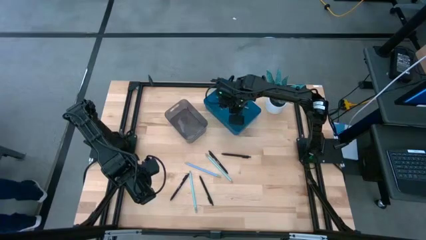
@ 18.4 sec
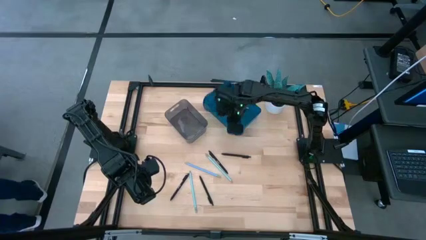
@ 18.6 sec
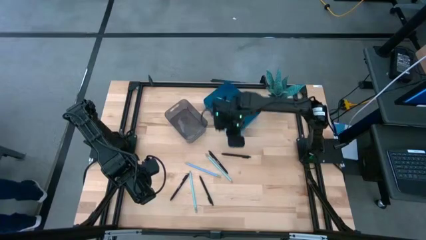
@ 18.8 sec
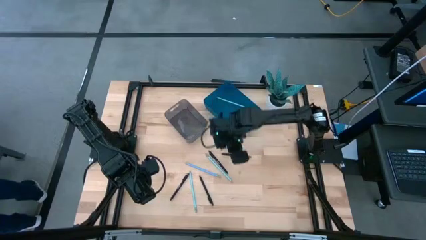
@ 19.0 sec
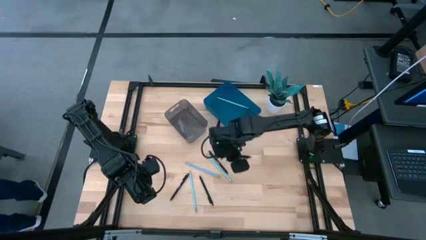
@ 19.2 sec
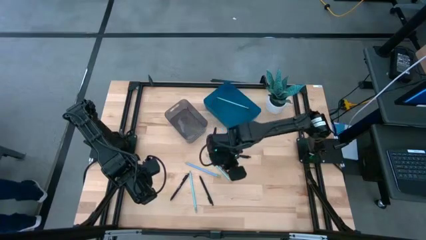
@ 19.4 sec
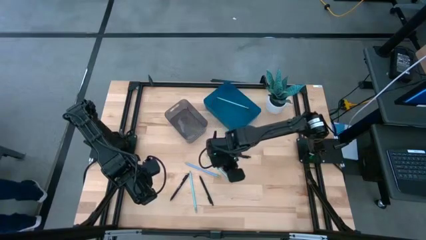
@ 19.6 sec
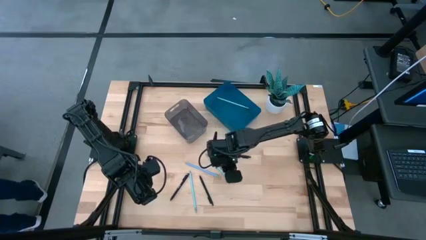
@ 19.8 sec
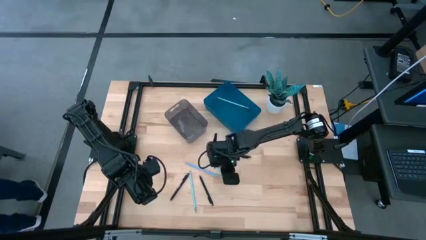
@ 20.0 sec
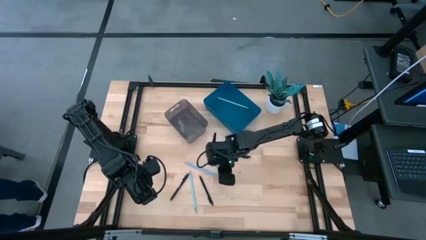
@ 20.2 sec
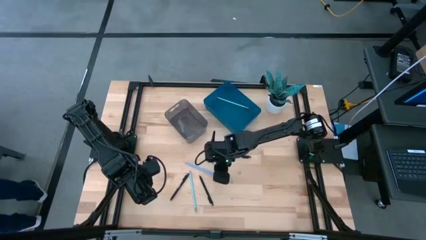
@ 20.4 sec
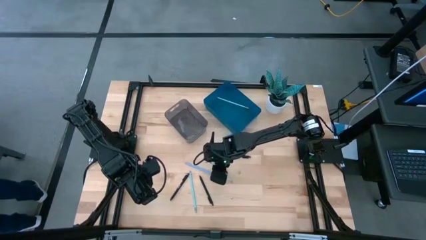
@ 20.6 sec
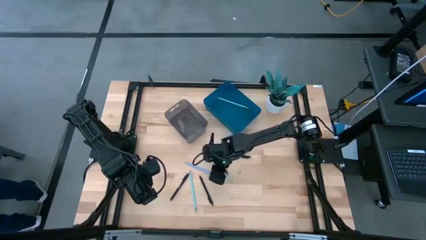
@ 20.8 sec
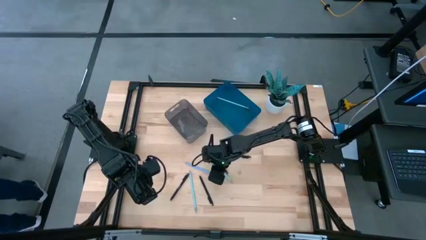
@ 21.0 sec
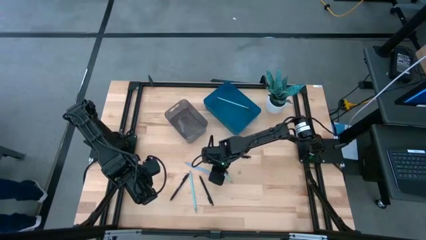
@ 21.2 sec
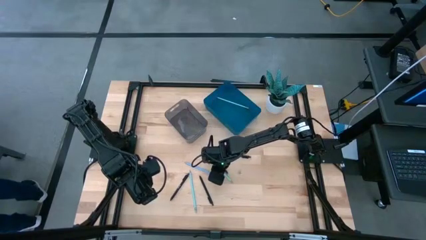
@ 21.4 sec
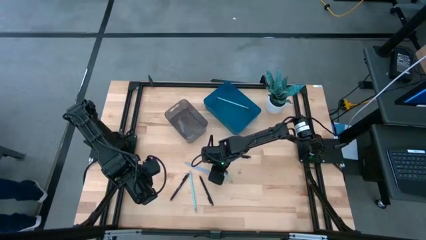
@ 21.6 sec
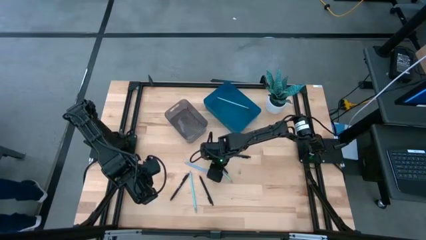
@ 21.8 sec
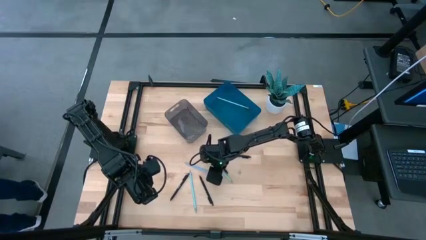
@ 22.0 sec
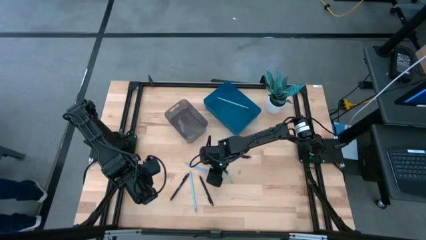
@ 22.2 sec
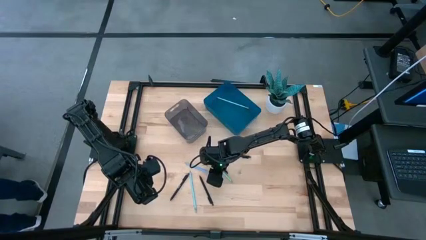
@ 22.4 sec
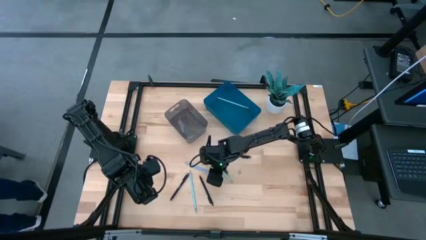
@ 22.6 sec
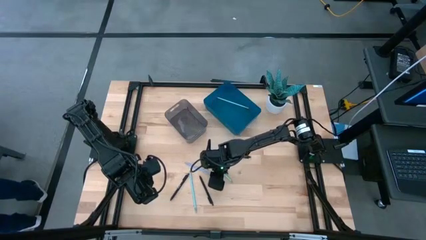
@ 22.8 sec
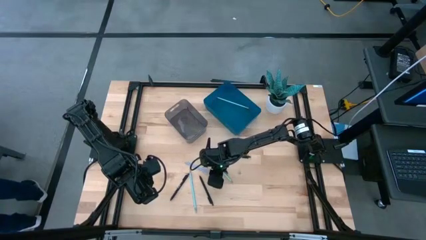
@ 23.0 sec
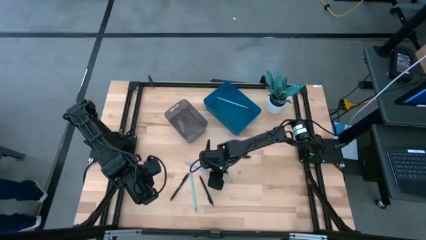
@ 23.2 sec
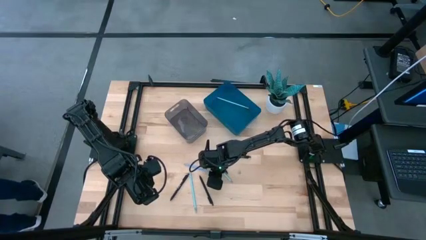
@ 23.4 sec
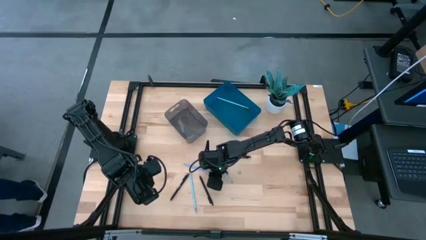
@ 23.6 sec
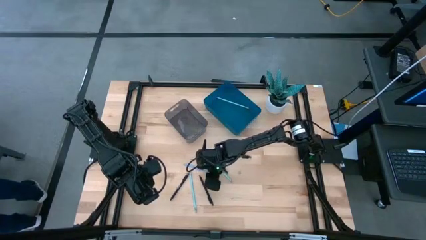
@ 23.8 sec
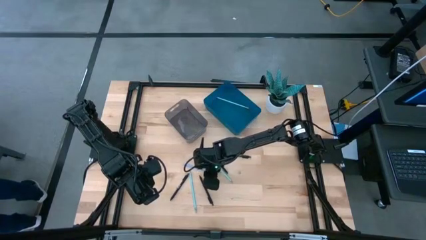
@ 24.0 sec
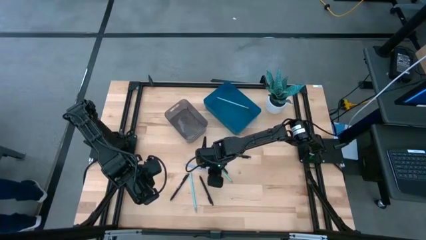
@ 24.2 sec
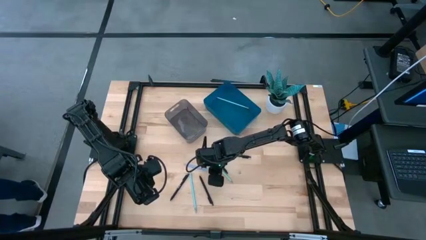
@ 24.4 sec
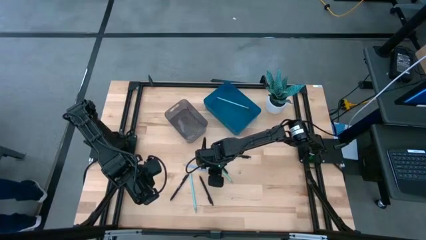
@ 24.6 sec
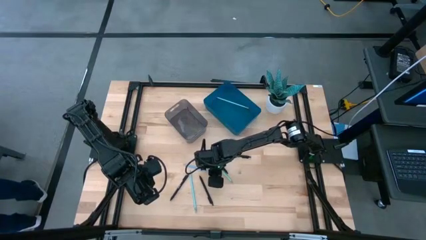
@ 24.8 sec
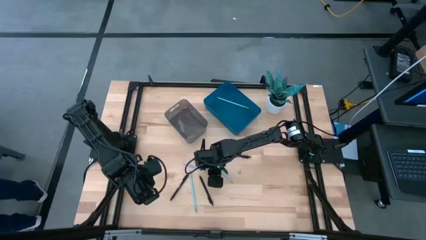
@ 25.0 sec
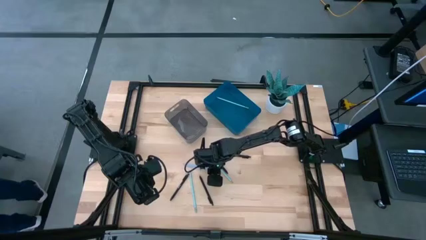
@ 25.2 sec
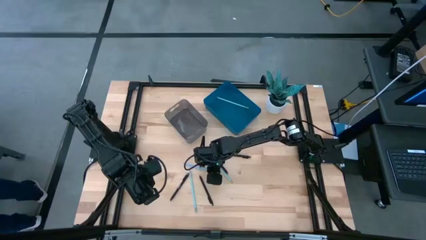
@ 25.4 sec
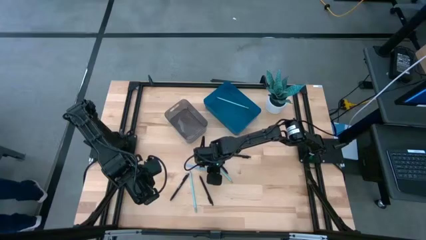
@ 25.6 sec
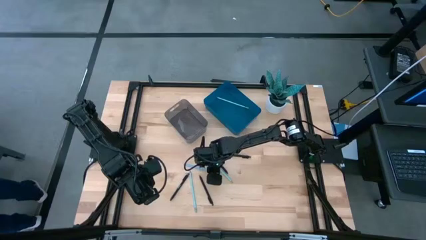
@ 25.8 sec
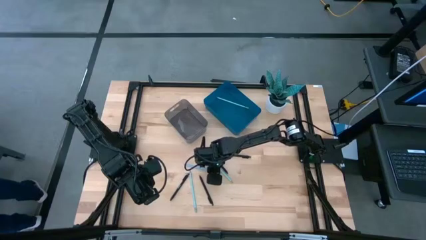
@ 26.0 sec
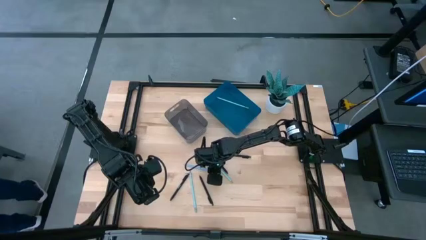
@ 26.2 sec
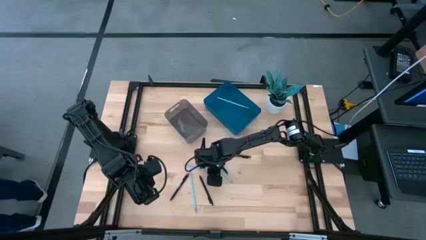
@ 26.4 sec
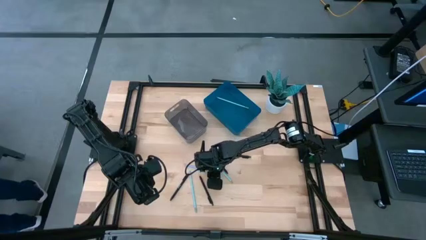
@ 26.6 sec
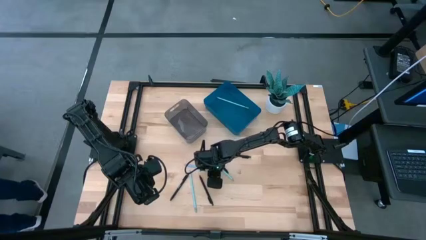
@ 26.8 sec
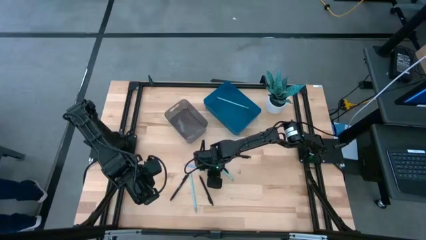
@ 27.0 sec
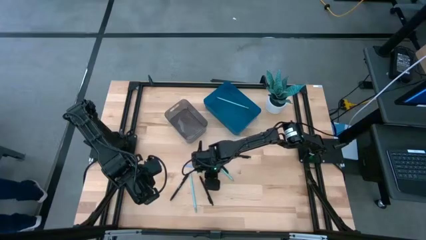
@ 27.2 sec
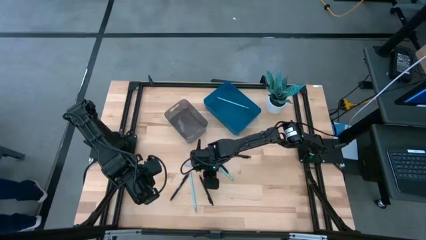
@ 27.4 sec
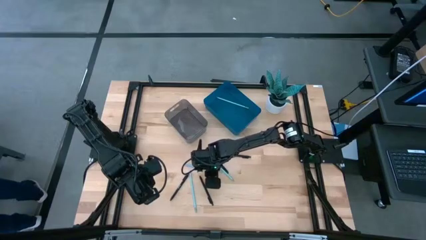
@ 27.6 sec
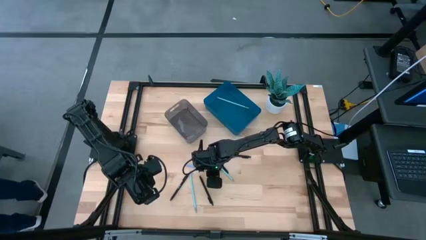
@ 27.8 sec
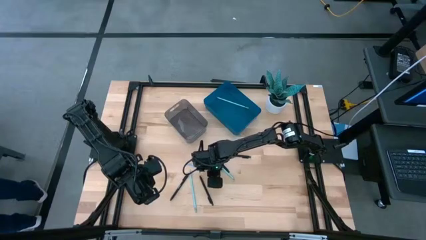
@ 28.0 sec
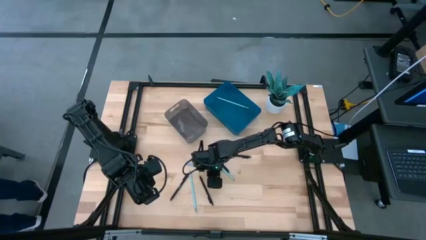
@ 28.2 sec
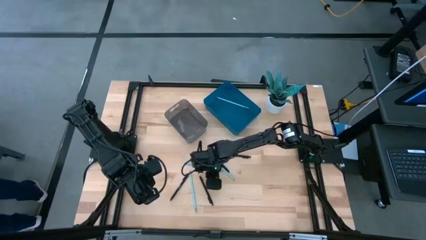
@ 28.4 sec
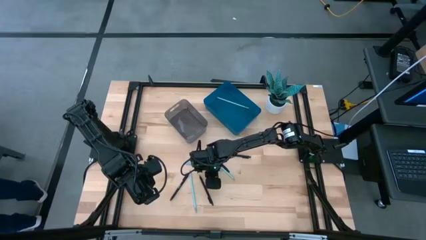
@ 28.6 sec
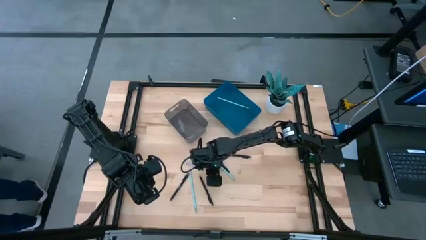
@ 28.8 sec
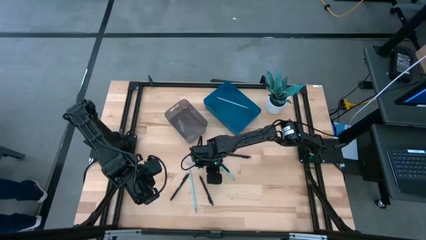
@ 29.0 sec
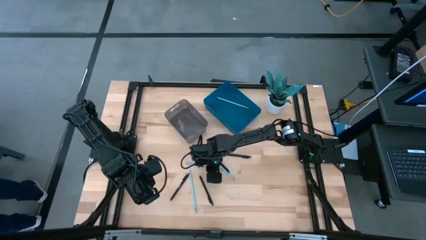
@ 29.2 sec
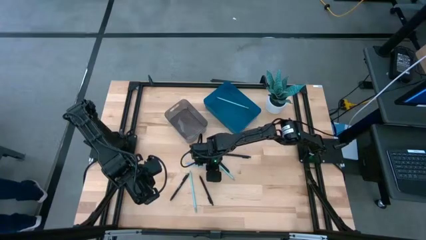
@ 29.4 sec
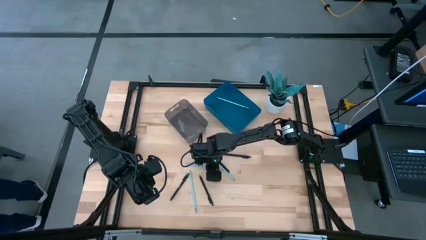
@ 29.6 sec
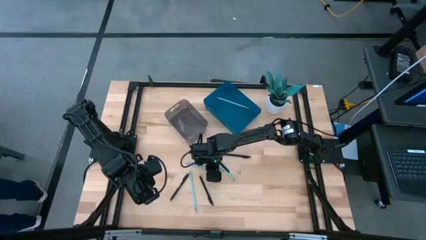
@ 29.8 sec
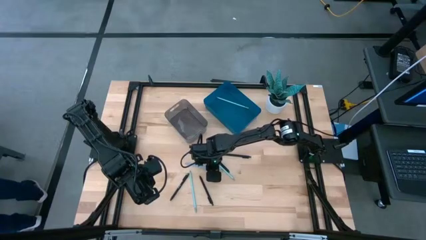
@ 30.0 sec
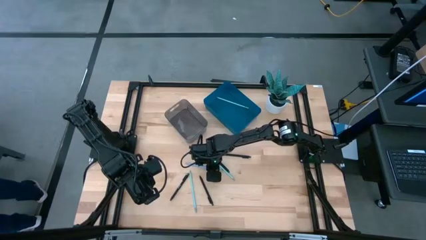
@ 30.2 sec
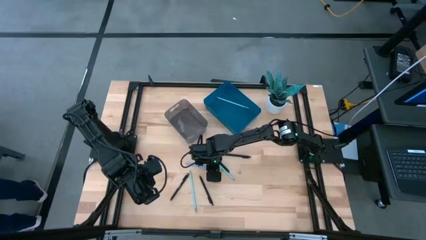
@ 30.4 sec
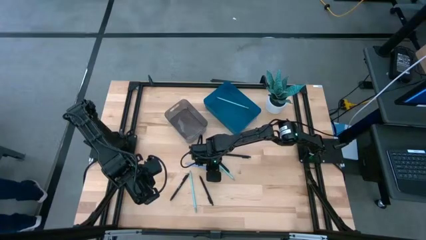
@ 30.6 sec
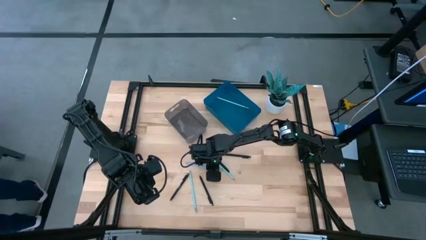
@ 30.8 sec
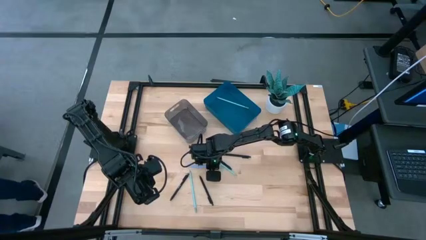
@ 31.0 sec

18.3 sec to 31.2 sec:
Task: Sort pens & pencils
Put the blue pencil into the blue bin

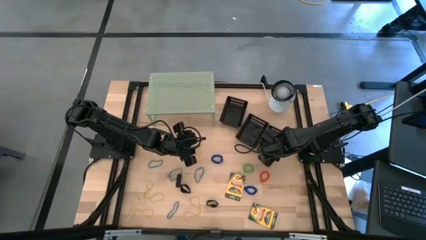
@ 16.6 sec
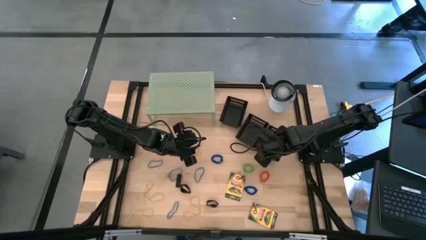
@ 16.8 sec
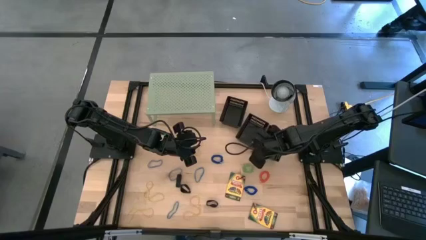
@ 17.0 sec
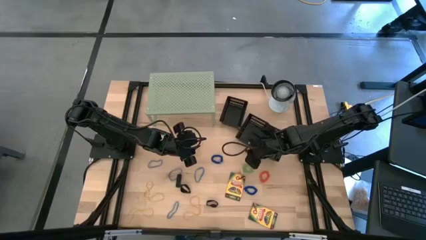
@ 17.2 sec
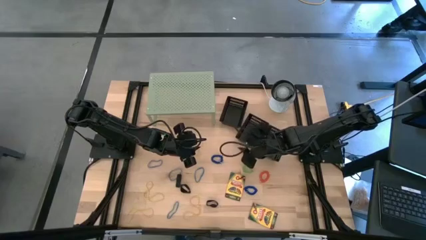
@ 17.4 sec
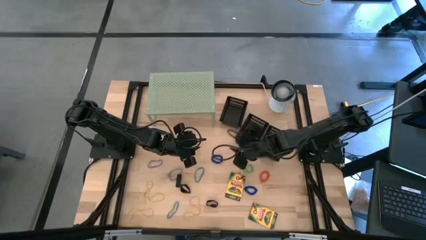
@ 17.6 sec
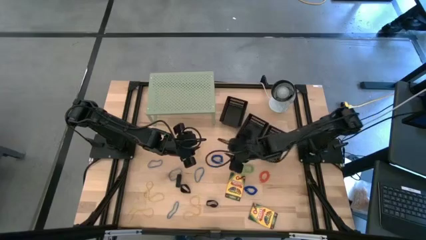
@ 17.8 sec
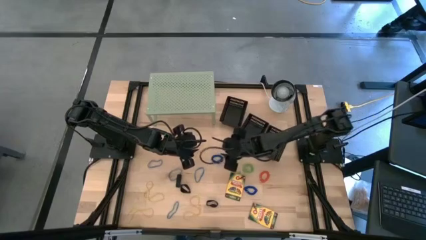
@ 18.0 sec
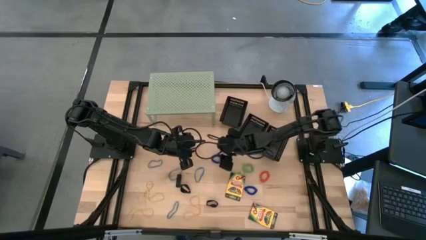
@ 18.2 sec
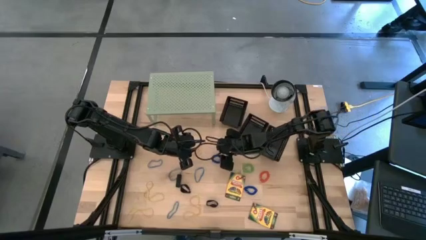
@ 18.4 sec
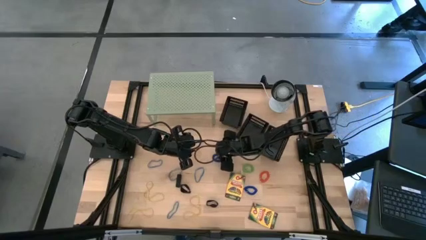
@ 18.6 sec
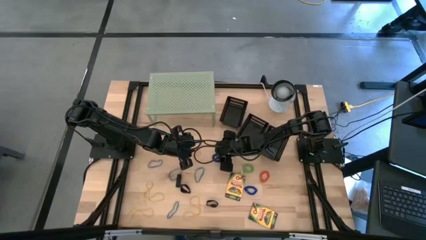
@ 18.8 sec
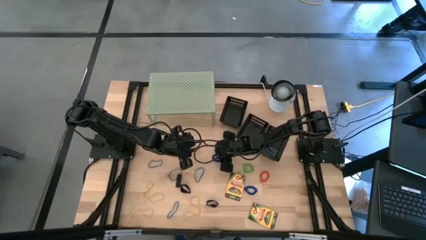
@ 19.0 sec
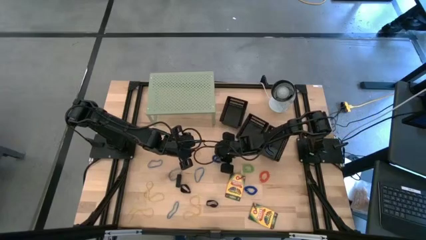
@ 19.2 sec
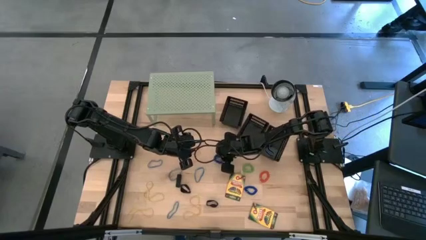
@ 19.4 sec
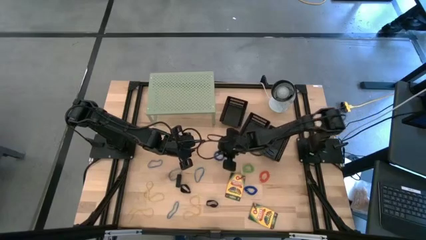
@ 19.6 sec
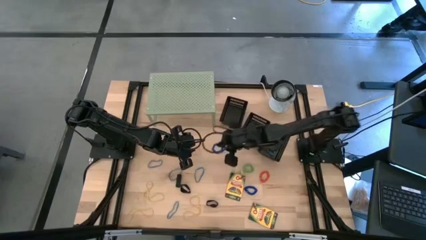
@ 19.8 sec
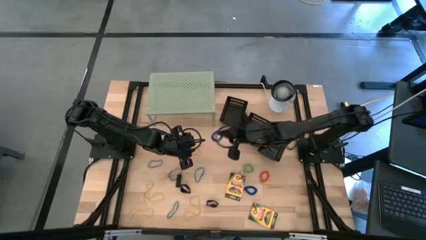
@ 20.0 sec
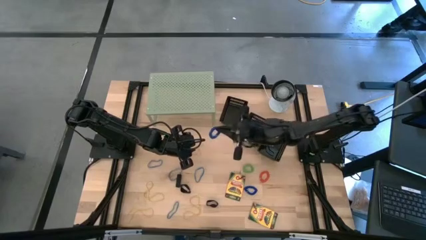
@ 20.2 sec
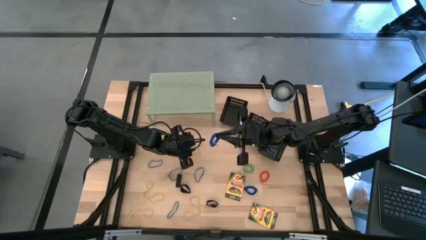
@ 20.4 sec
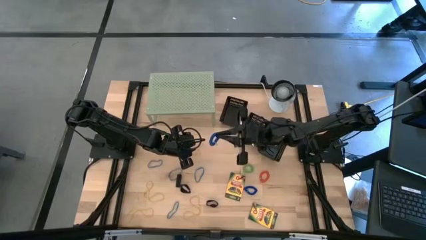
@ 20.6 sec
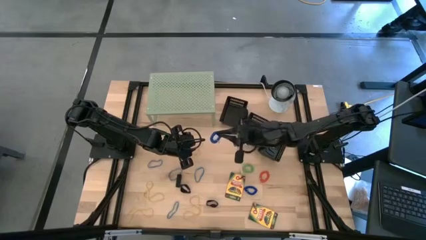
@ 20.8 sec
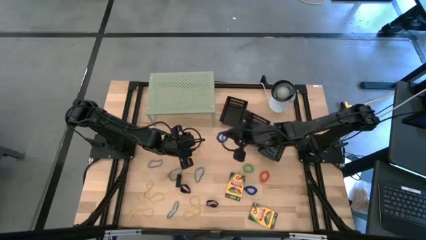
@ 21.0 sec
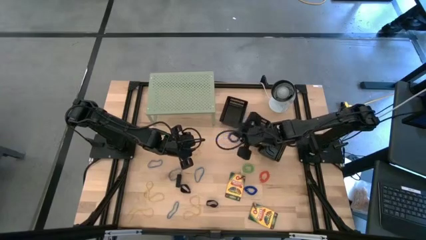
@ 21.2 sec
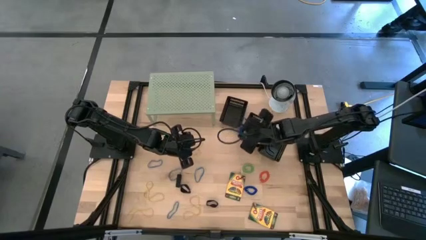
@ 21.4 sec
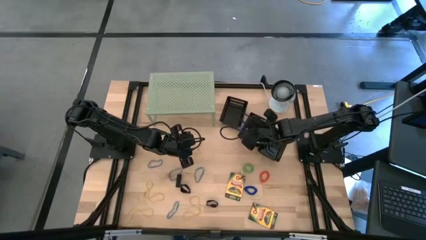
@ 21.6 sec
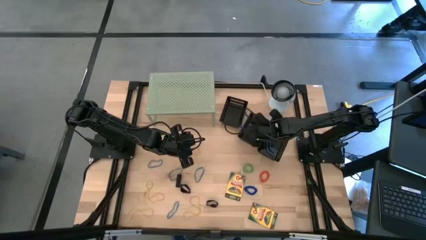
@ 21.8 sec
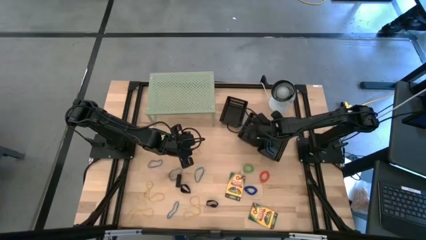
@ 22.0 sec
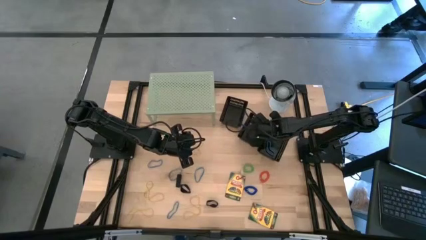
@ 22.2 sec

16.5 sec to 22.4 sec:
Task: Pick & Place Office Desk Supplies
Put the blue spring keychain into the middle black bin
